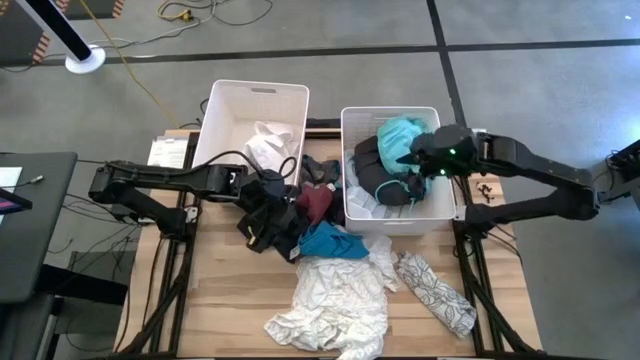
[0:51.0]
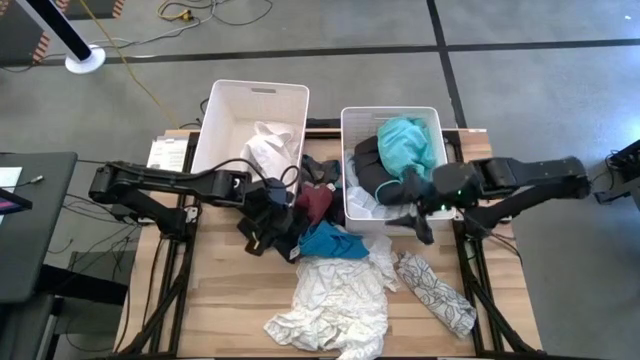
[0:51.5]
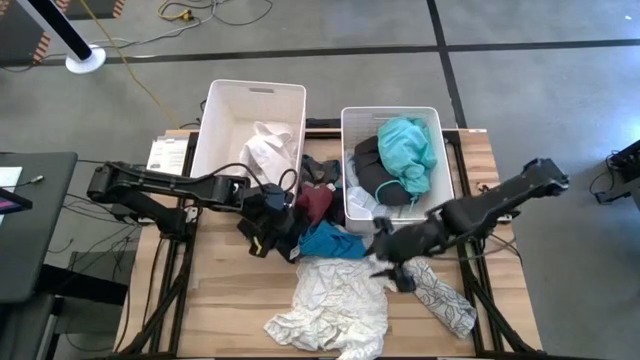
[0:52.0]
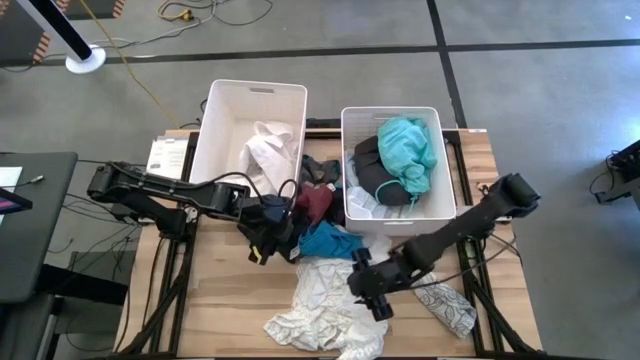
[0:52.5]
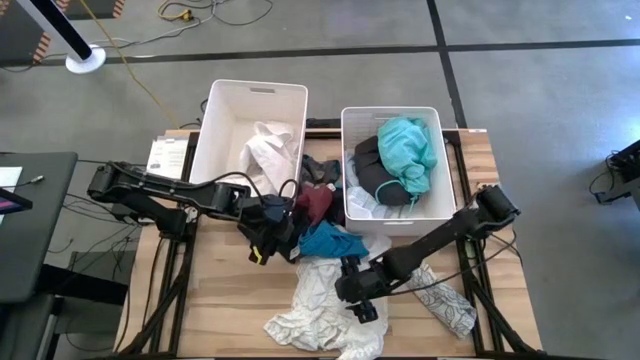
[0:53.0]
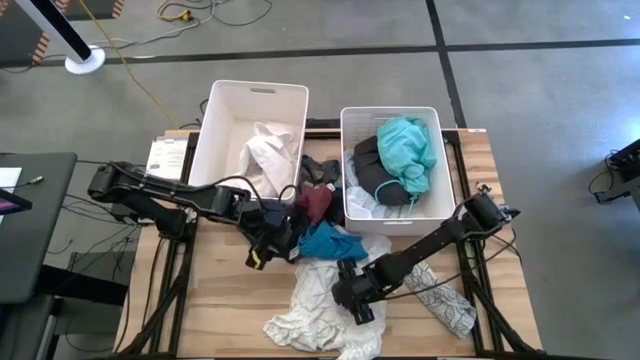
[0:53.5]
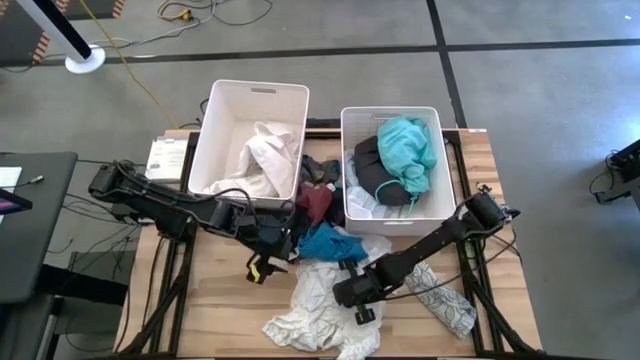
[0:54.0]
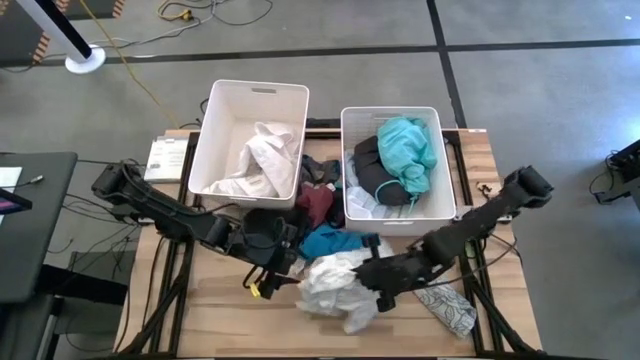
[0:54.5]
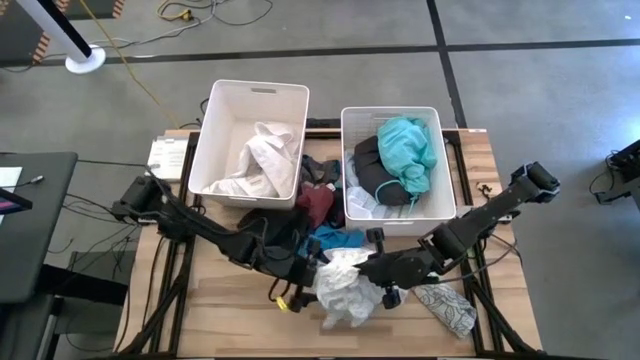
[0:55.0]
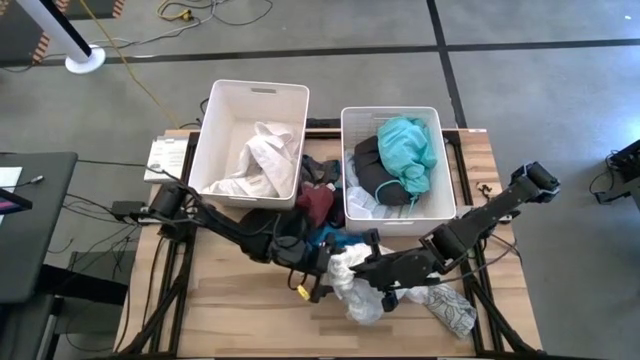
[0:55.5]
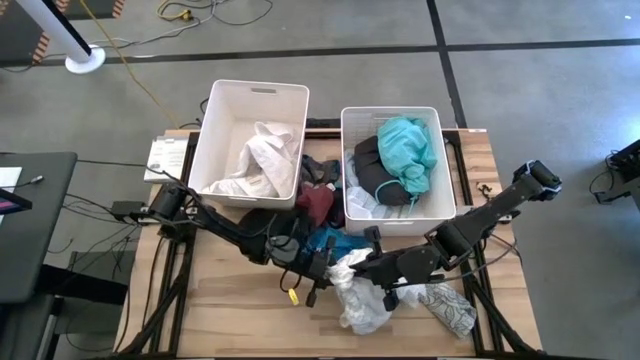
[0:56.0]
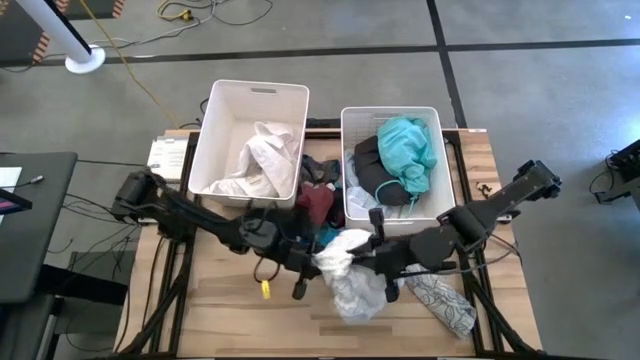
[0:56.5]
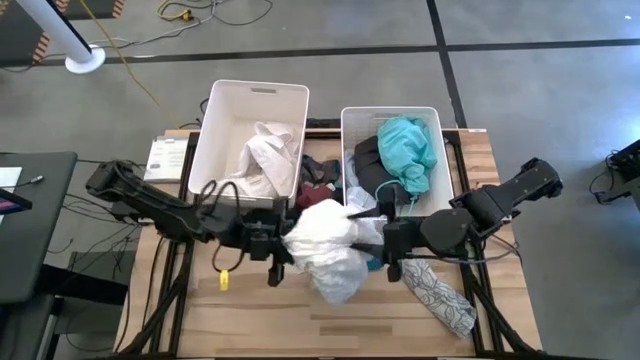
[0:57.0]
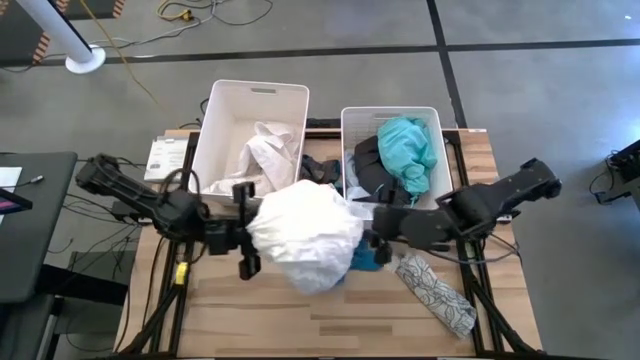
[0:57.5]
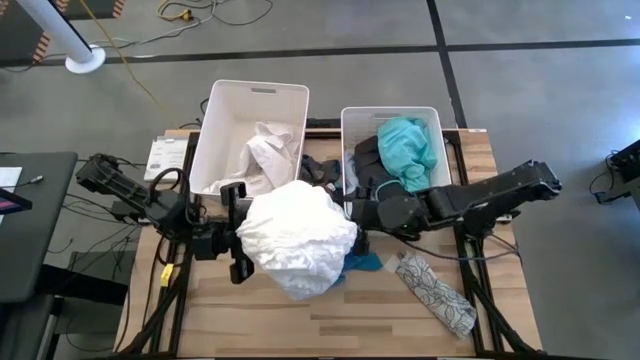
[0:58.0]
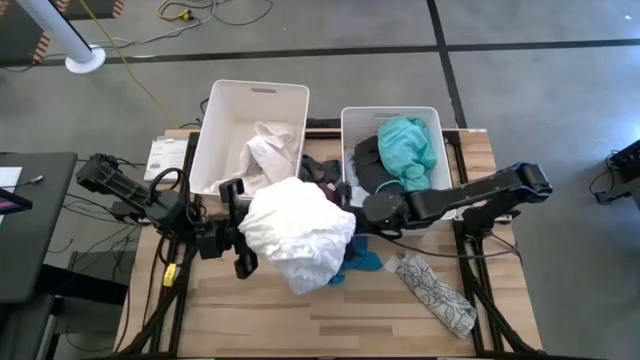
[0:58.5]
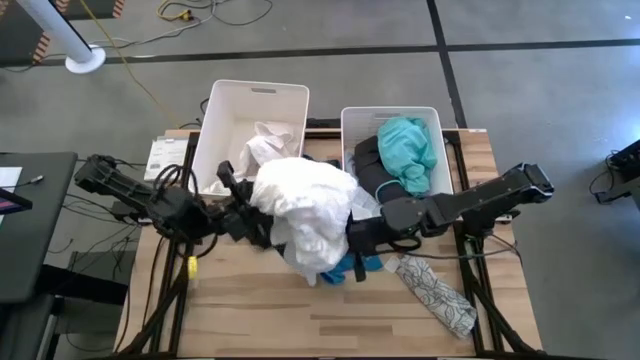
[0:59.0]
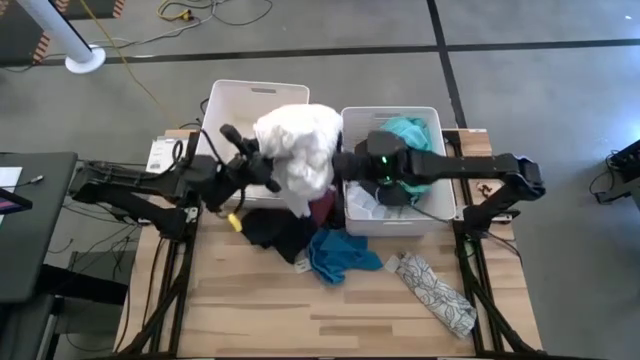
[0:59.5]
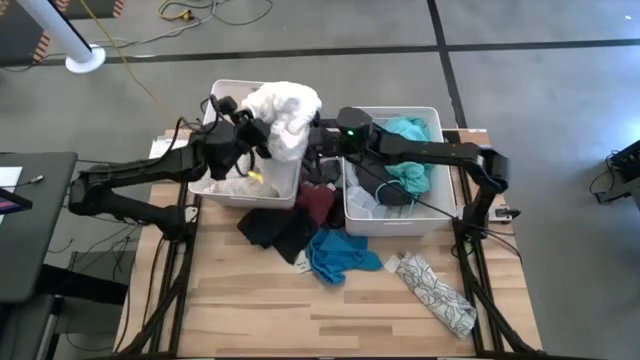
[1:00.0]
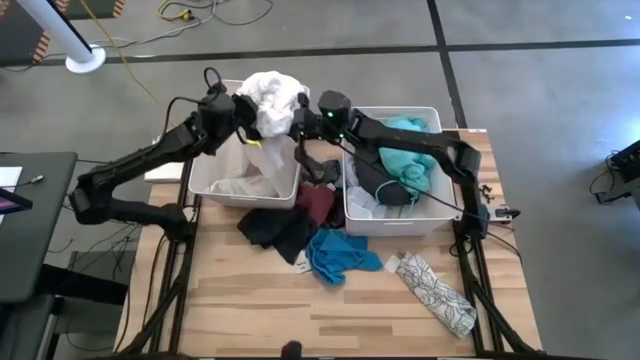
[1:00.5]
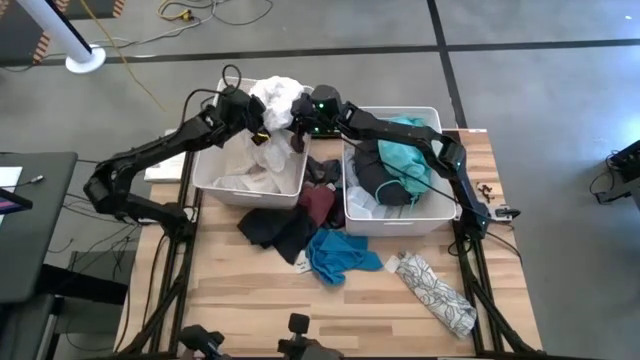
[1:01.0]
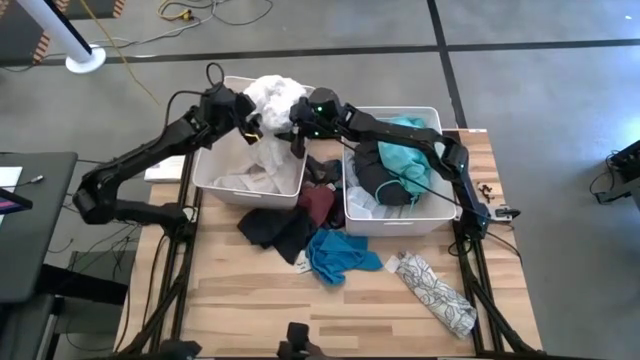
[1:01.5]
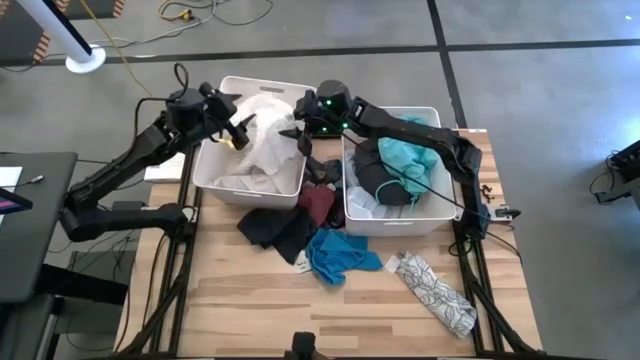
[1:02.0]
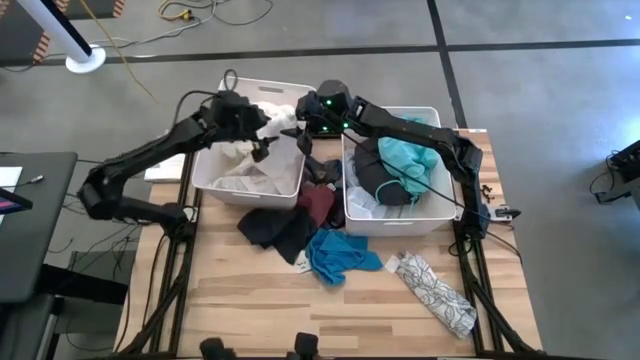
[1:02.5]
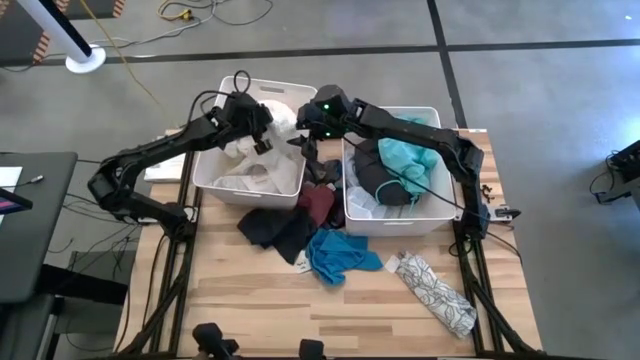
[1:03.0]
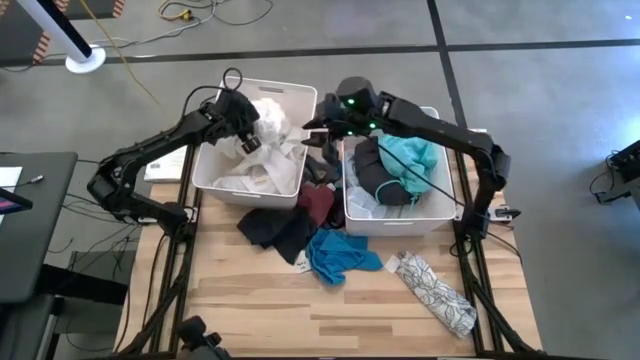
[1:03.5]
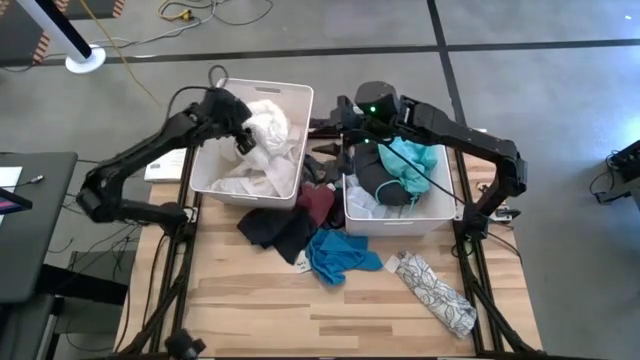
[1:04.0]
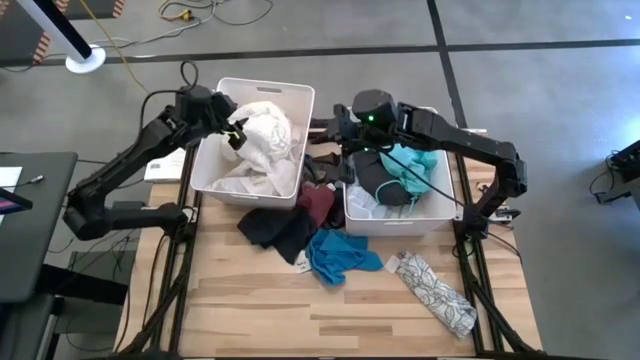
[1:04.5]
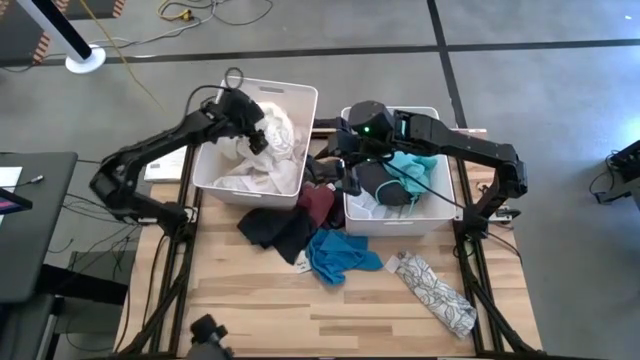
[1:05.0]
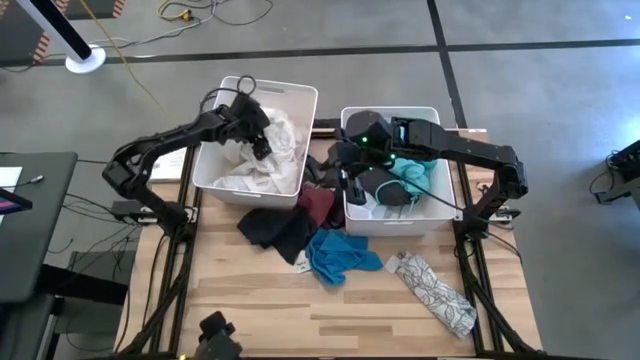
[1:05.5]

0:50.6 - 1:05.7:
Task: Sort clothes
Put the white dress into the left white laundry bin

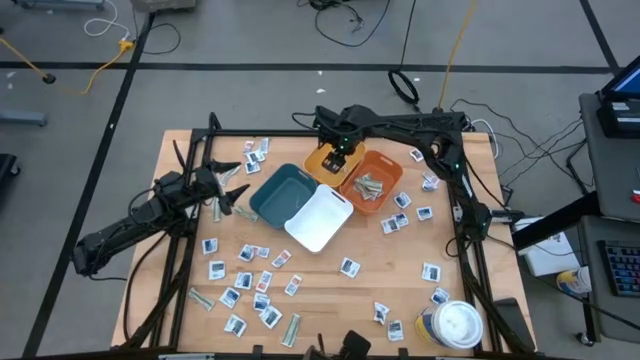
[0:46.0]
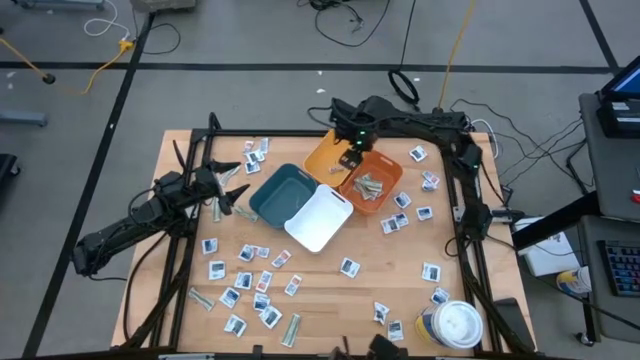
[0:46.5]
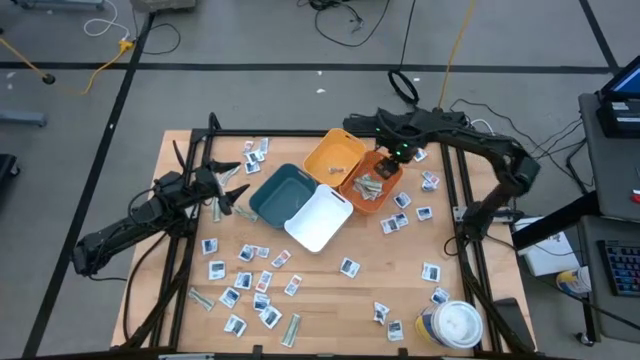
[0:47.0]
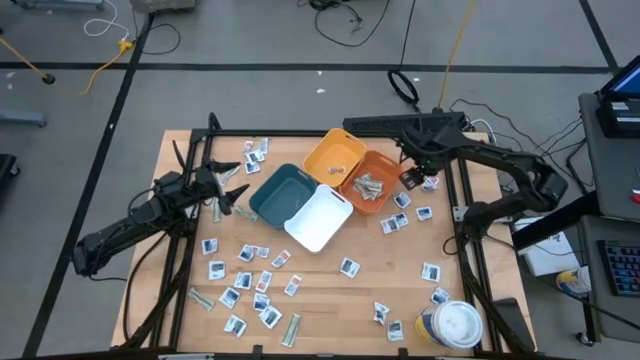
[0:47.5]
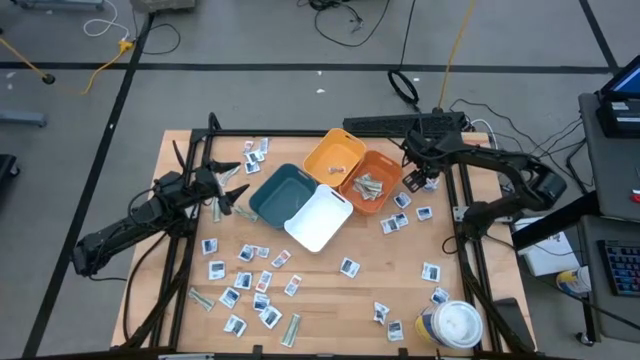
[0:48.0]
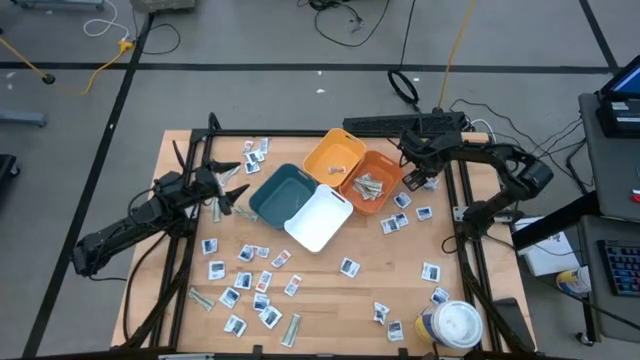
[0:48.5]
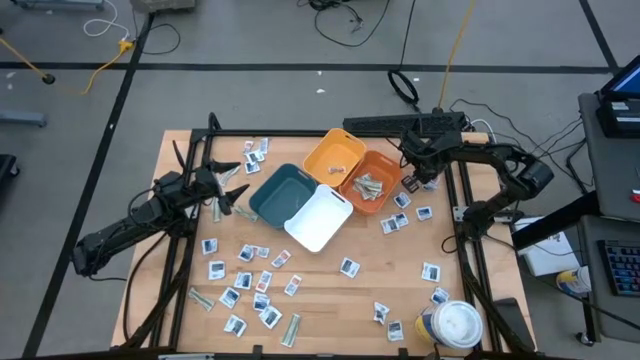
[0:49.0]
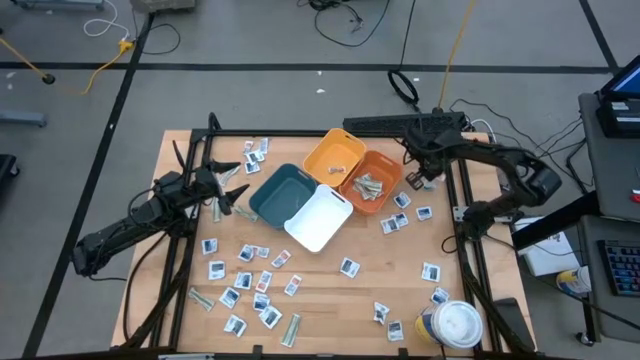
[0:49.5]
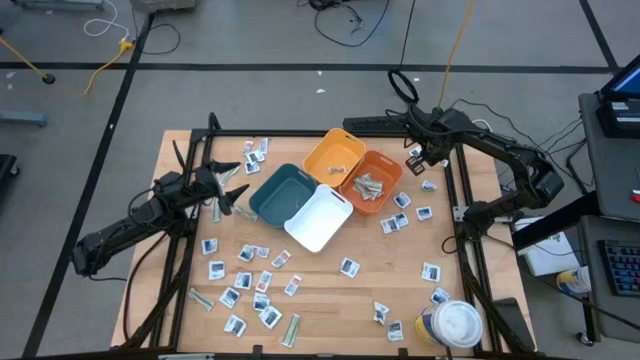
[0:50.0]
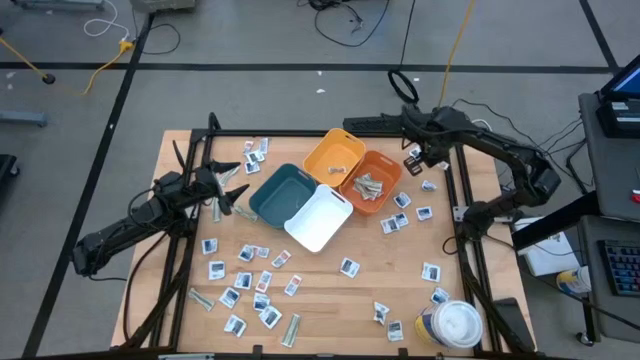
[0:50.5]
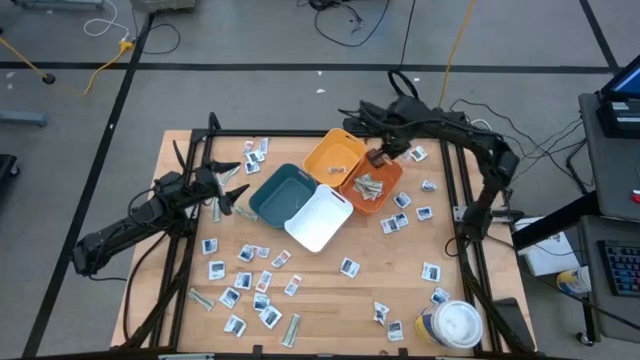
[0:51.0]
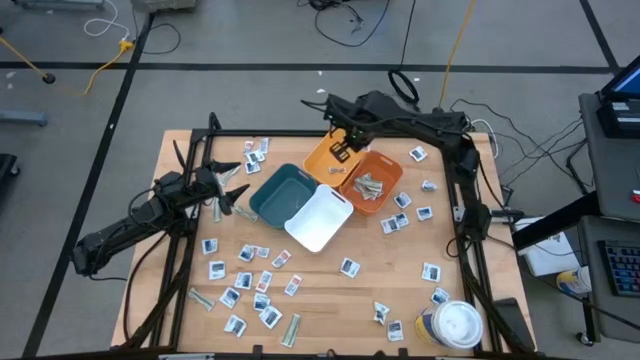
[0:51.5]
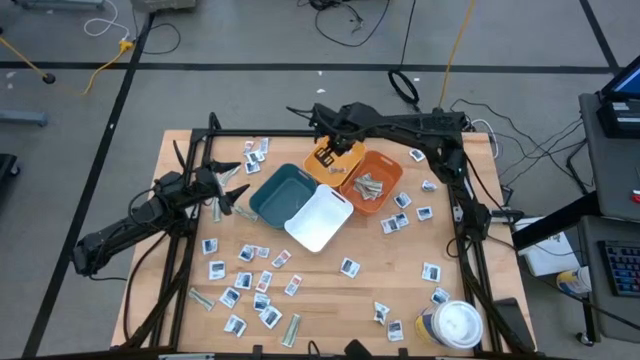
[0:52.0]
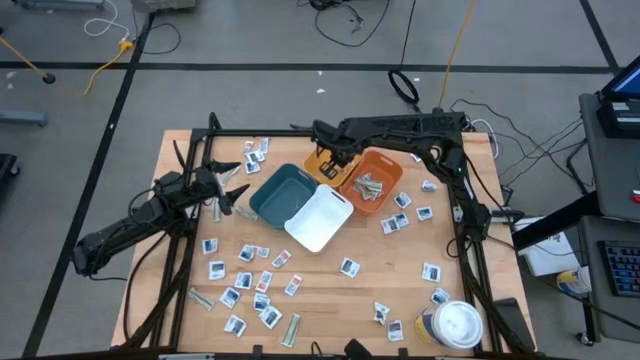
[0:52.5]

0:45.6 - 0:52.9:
Task: Pick & Place First Aid Supplies
Put the orange ointment pack into the yellow bin
